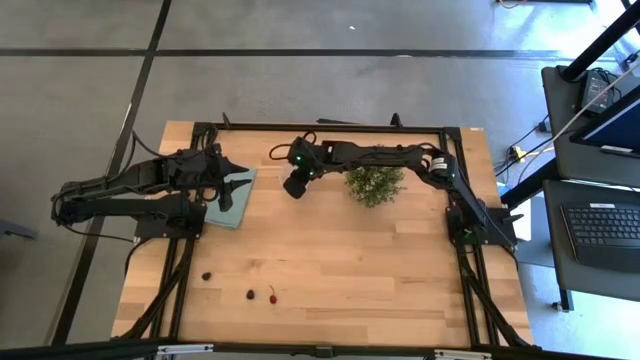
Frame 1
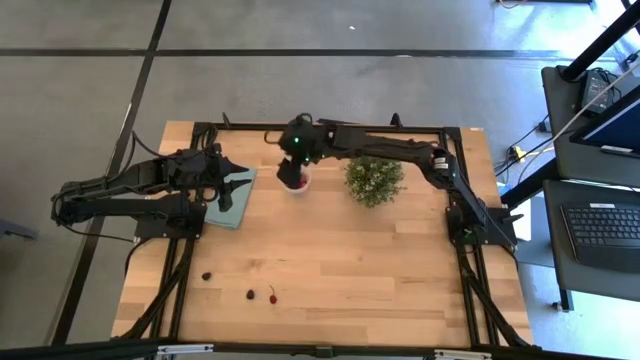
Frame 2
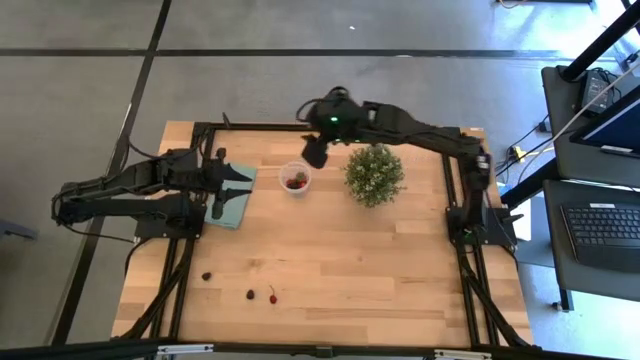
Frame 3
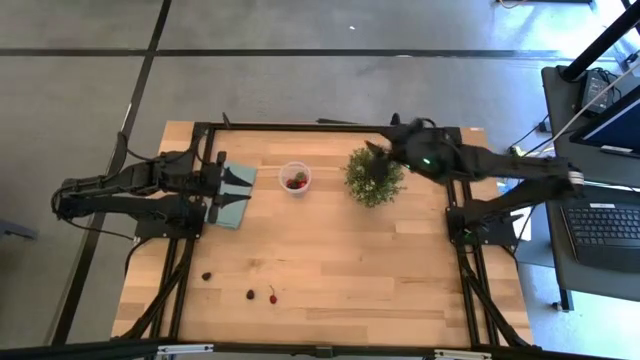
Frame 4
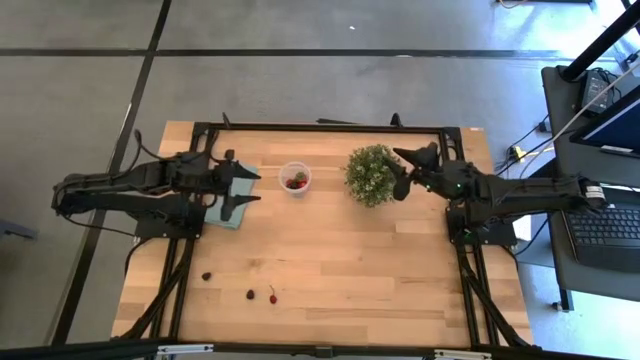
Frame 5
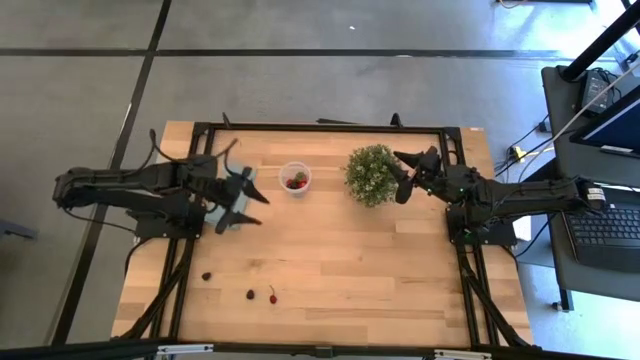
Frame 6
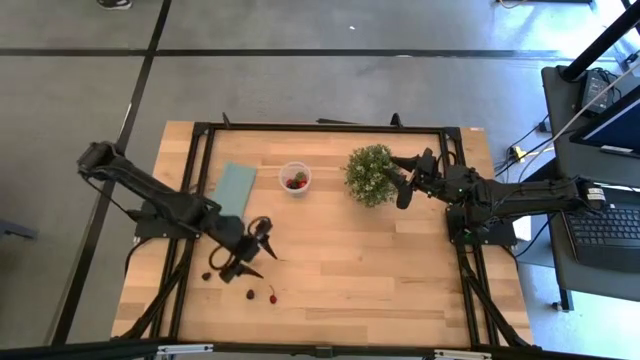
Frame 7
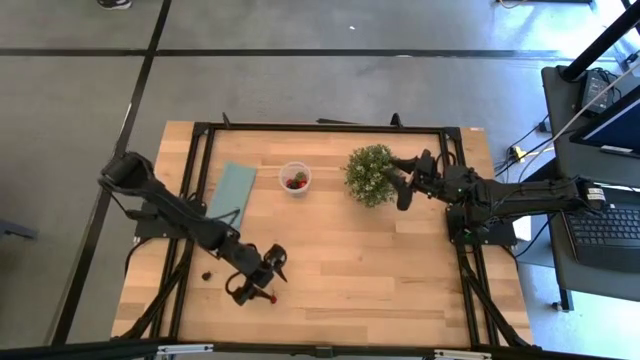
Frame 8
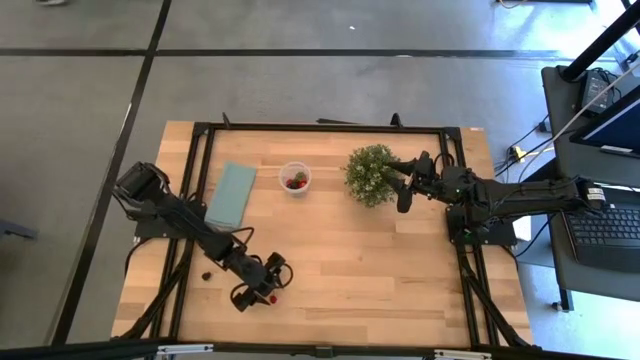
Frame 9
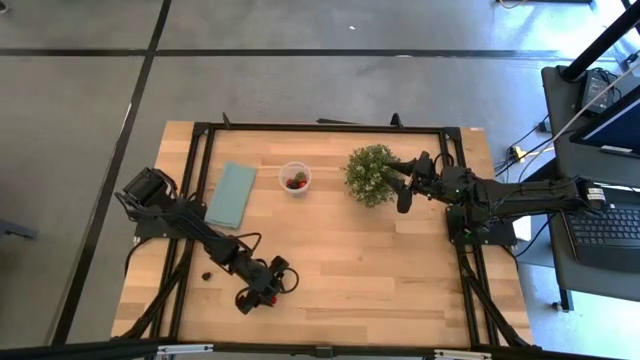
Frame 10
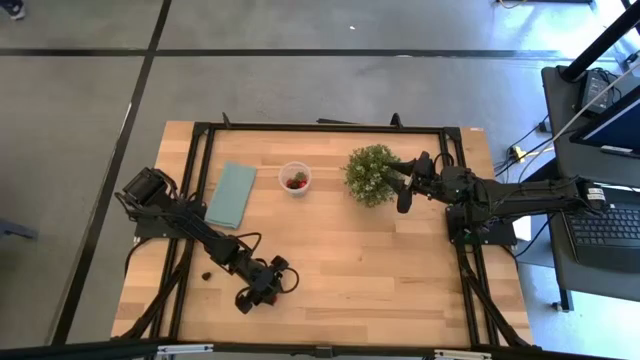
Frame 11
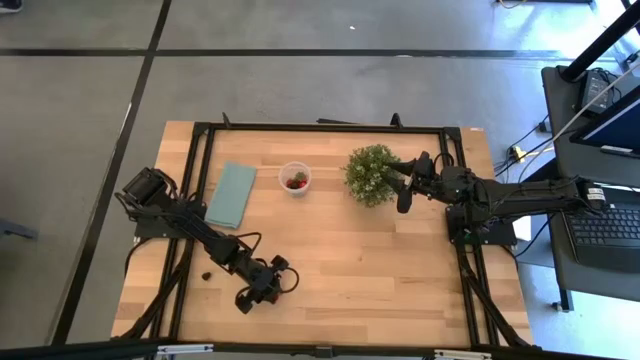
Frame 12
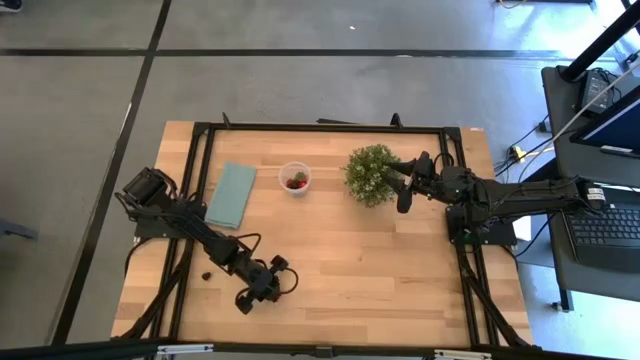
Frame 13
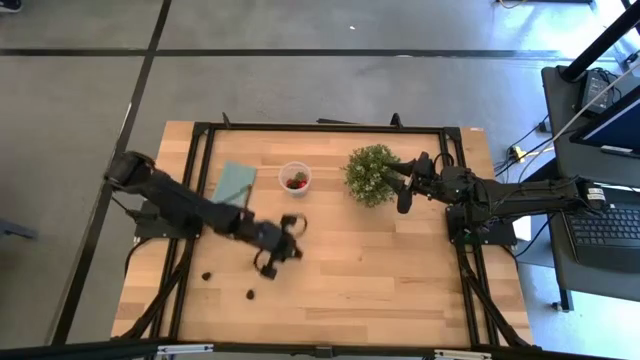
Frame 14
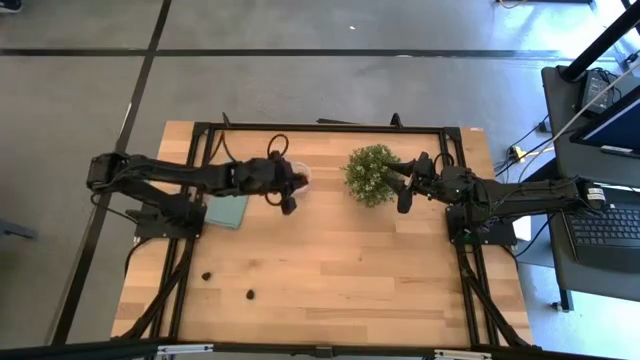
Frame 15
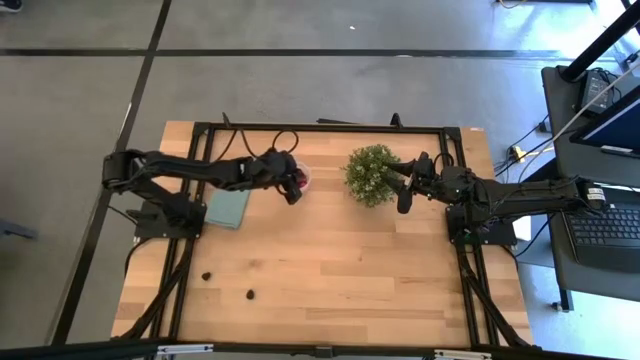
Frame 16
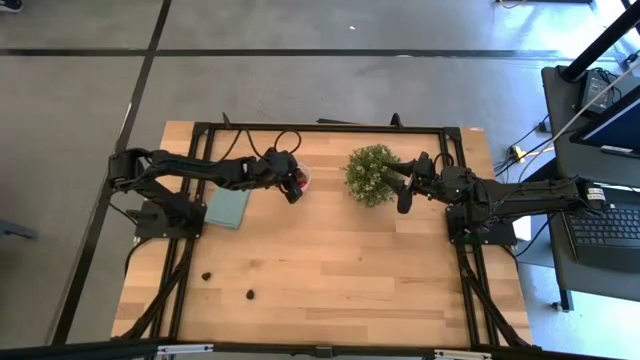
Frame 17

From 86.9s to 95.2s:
Task: Pick and placing Produce into tupperware
Put the red cherry into the transparent container

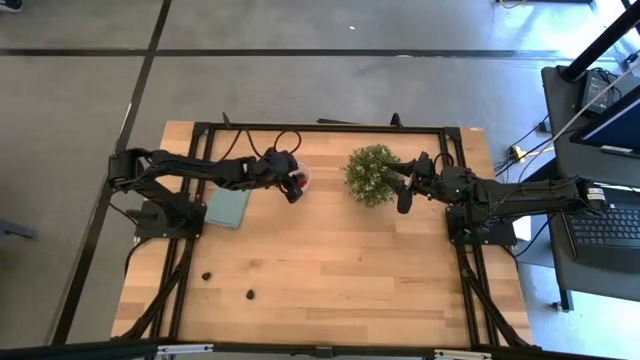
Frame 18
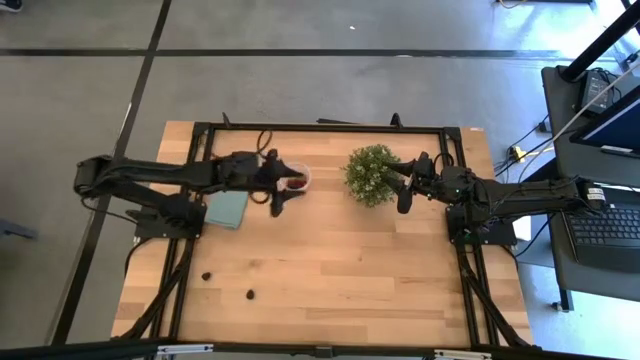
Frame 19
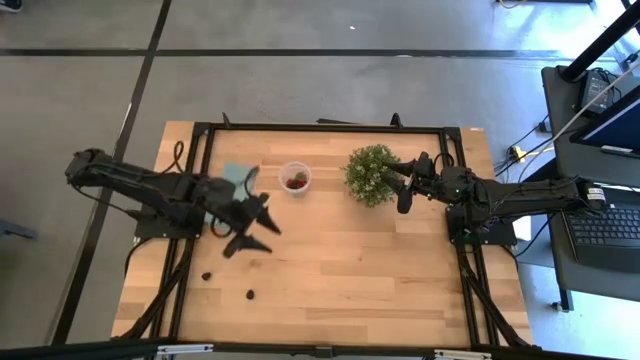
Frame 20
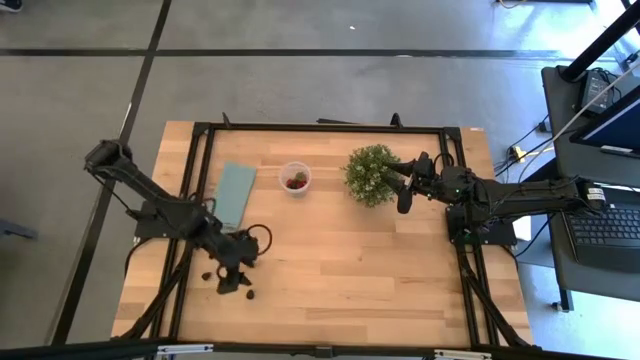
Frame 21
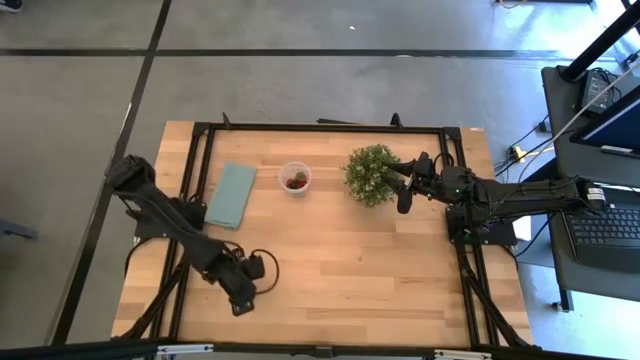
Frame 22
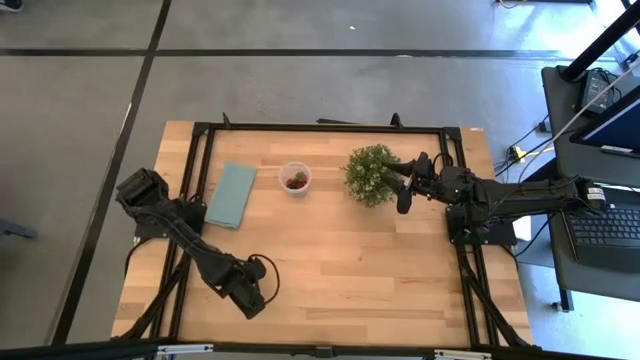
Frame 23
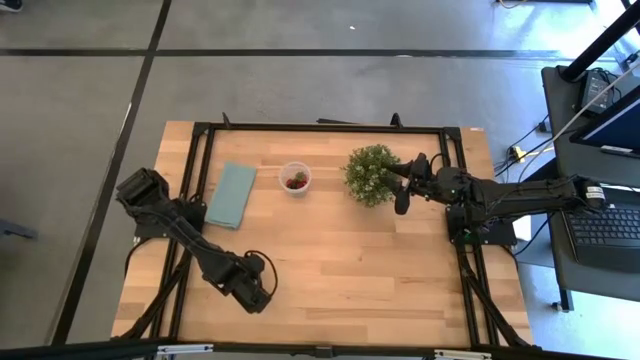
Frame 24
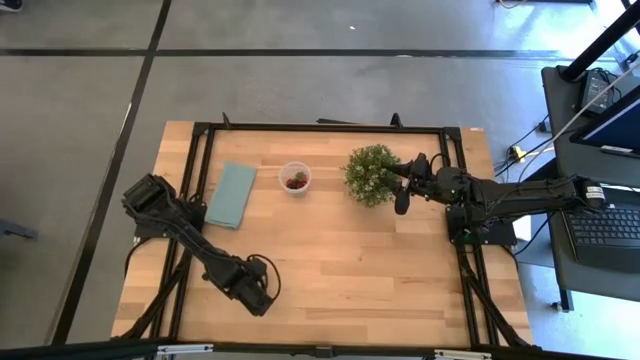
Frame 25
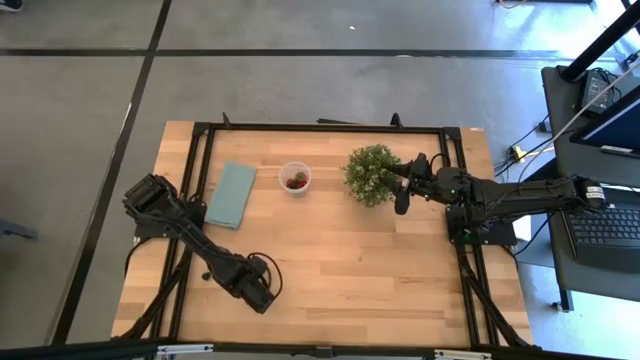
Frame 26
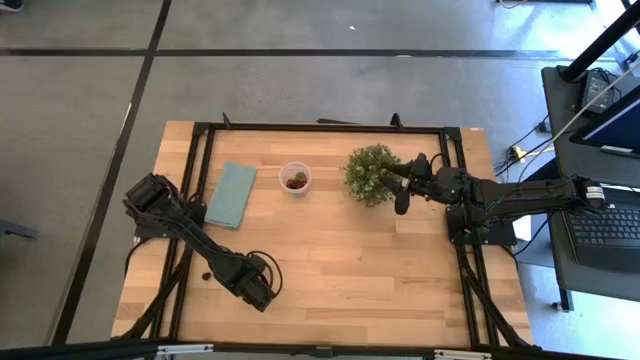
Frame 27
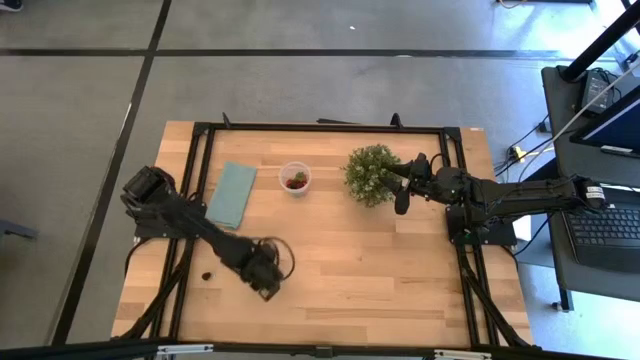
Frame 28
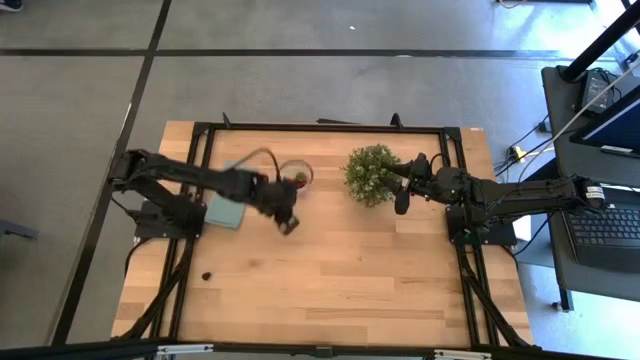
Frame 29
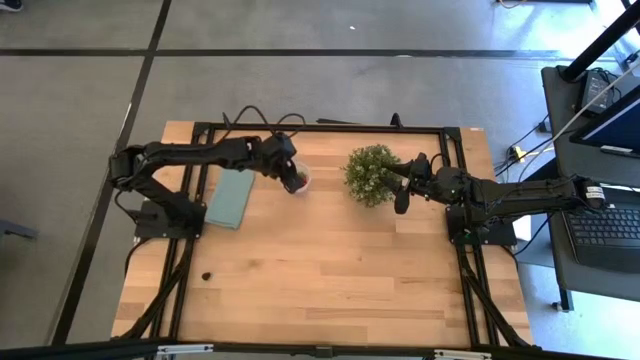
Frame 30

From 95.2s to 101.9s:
Put the blackberry into the transparent container

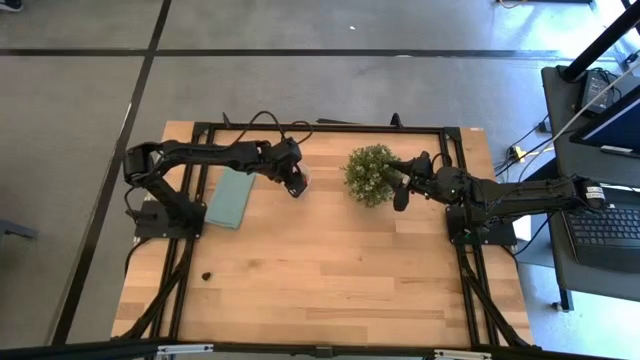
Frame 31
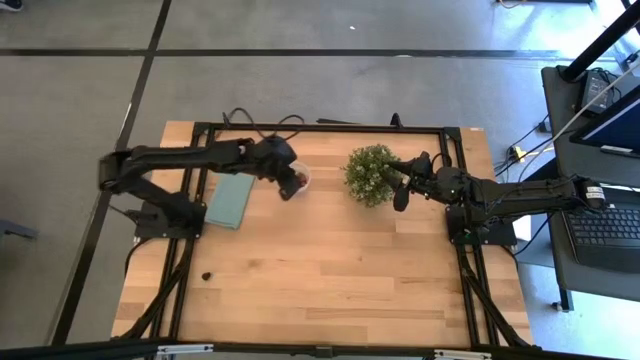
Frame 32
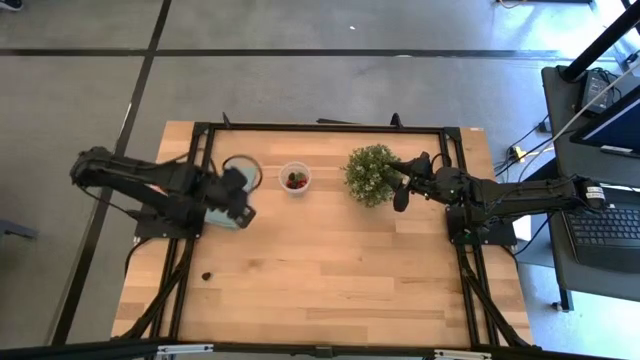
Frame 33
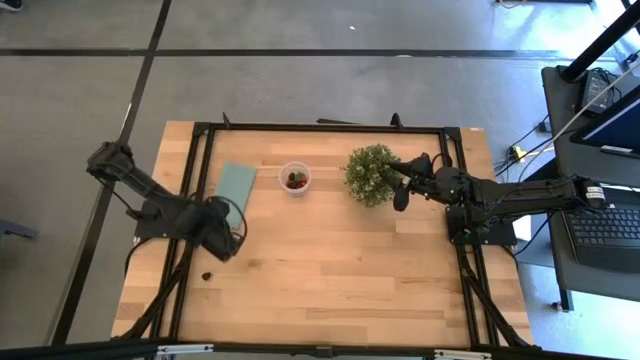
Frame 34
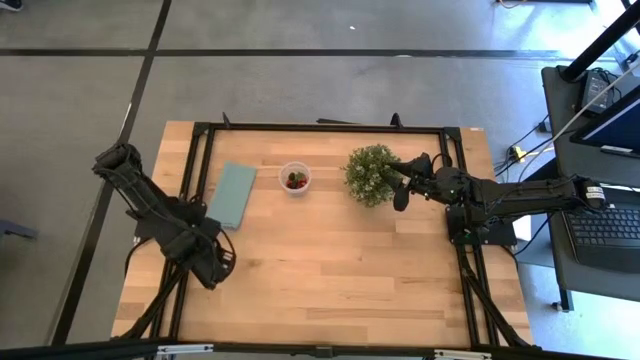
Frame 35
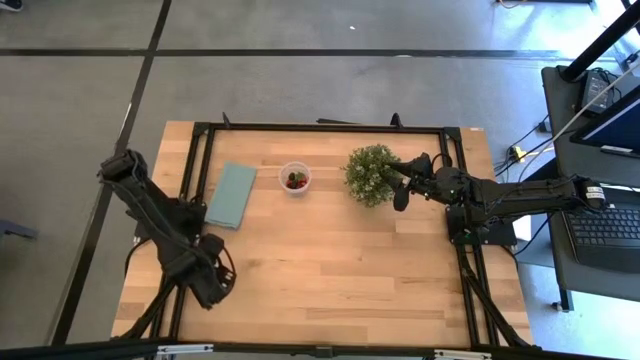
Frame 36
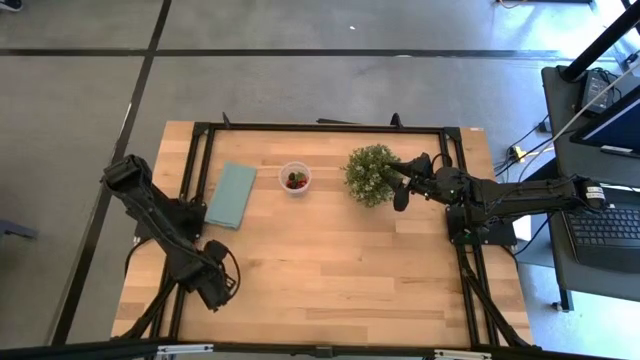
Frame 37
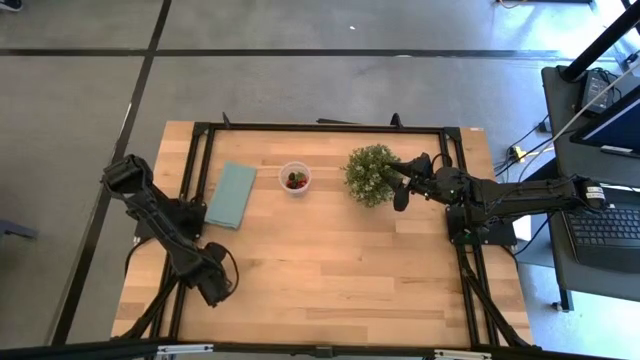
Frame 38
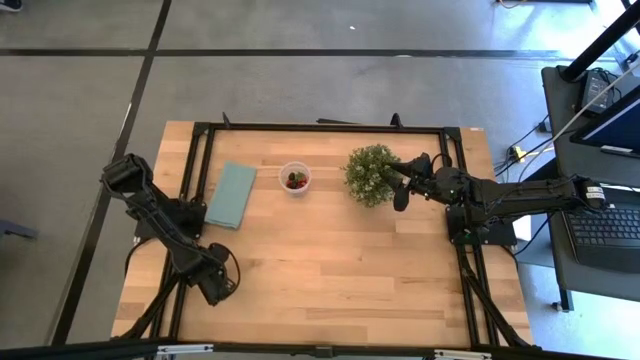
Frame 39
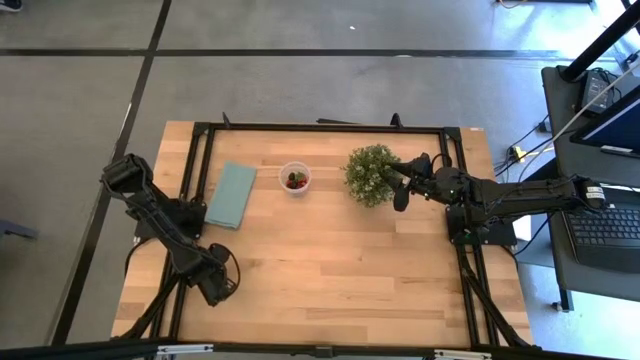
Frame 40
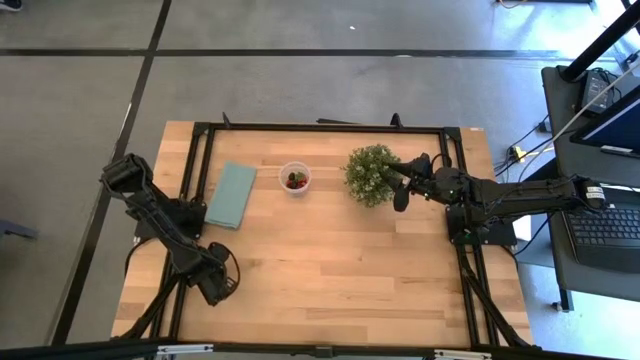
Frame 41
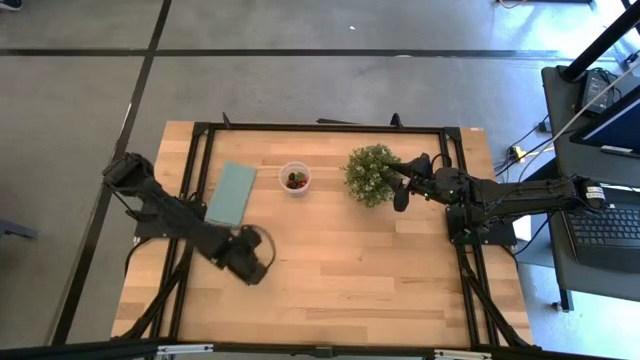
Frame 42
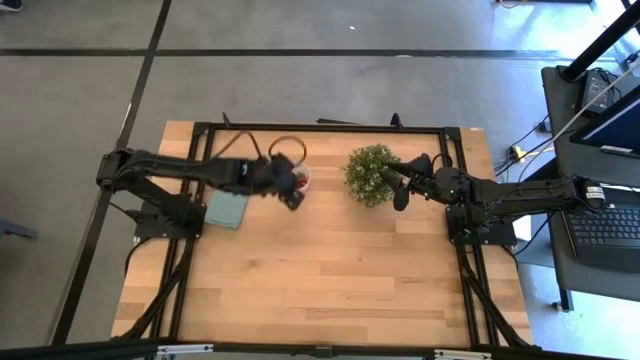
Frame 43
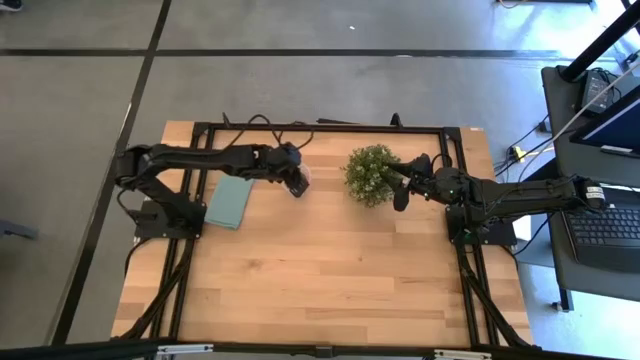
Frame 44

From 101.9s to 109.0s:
Put the blackberry into the transparent container
